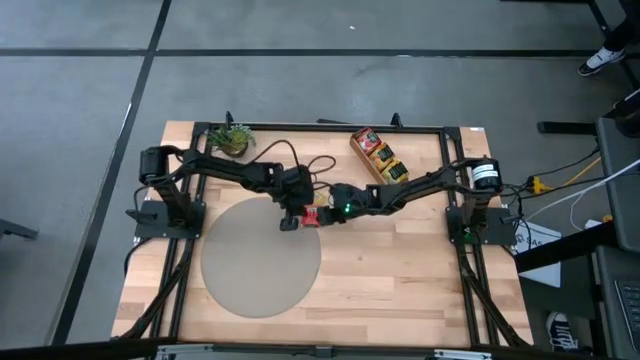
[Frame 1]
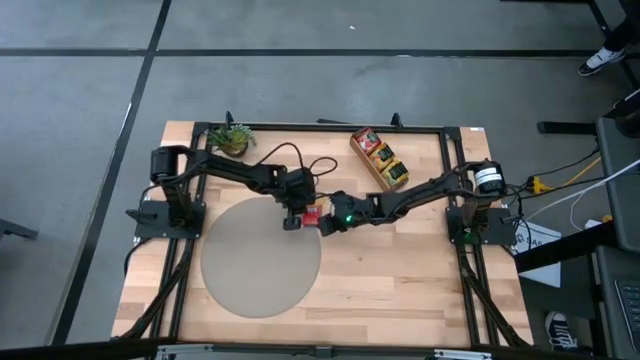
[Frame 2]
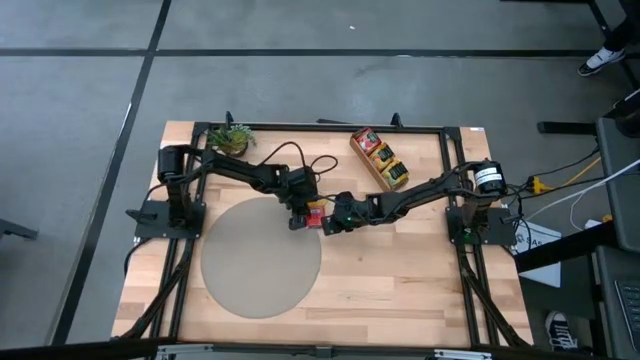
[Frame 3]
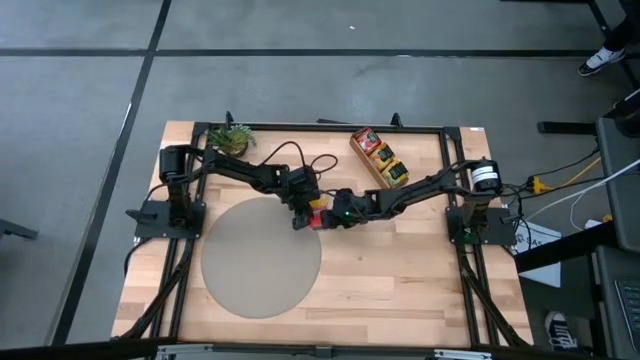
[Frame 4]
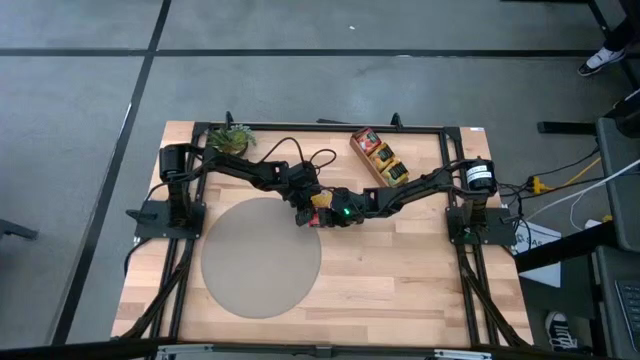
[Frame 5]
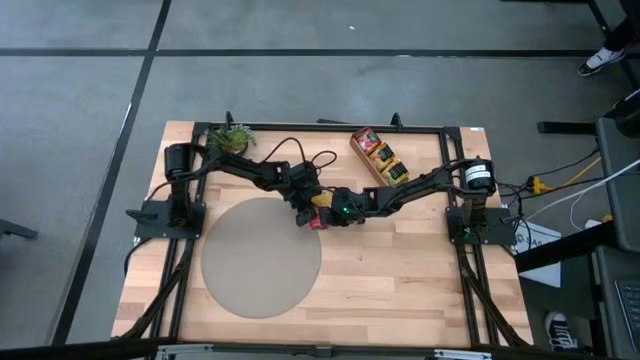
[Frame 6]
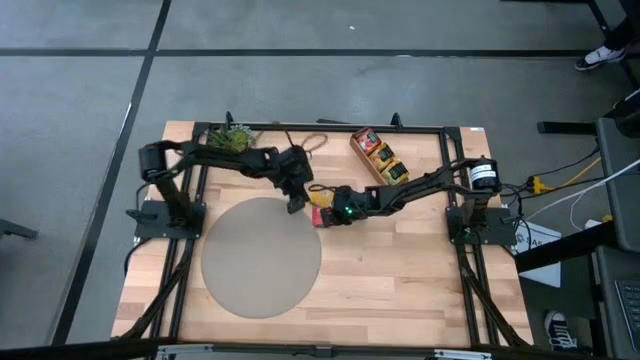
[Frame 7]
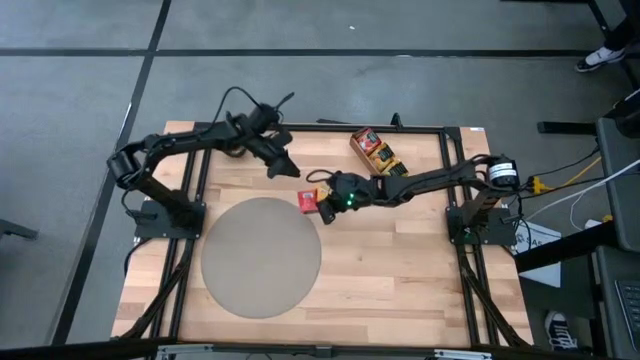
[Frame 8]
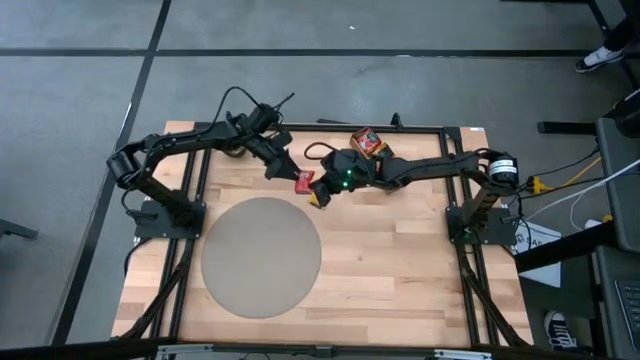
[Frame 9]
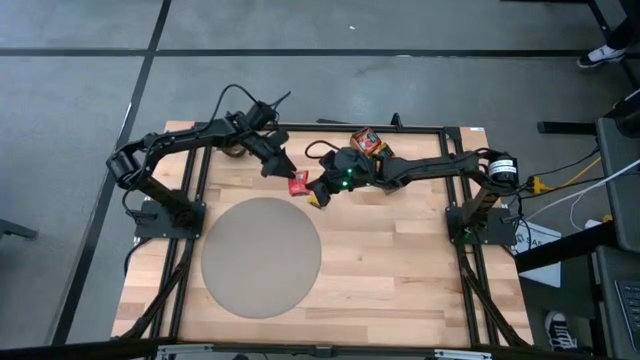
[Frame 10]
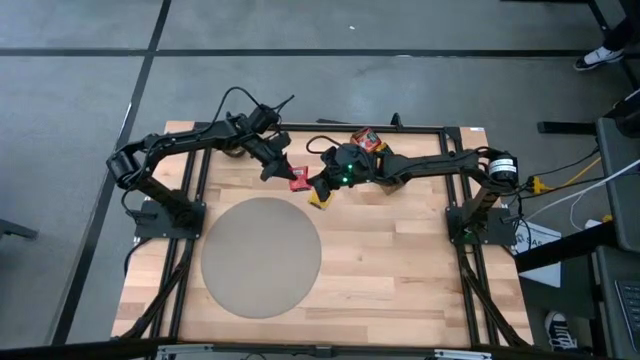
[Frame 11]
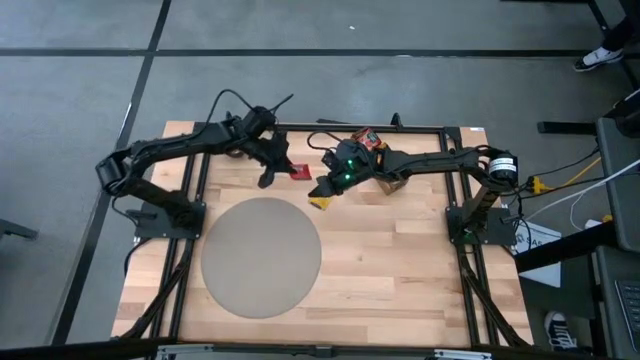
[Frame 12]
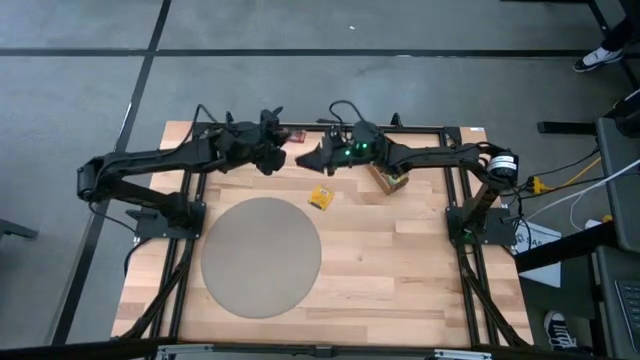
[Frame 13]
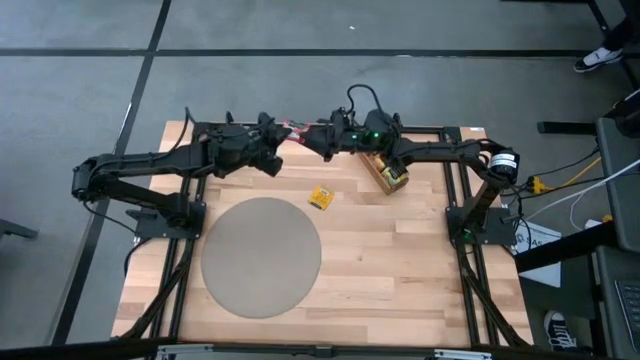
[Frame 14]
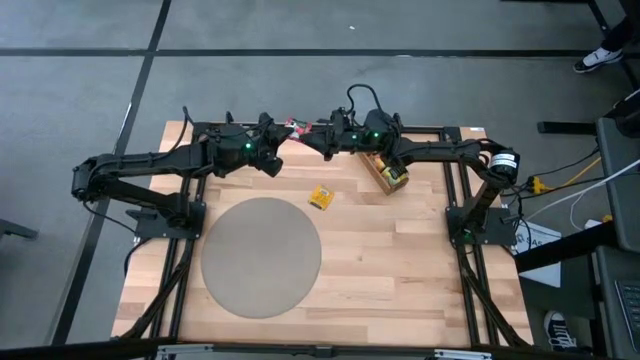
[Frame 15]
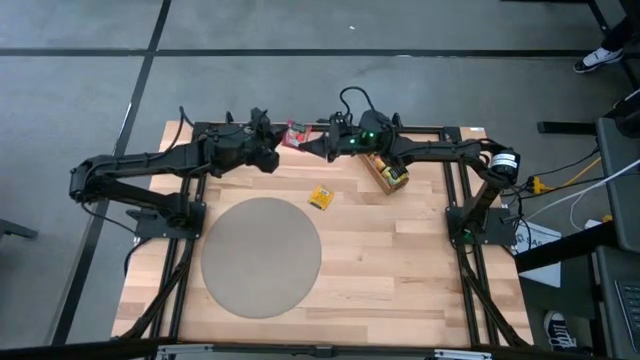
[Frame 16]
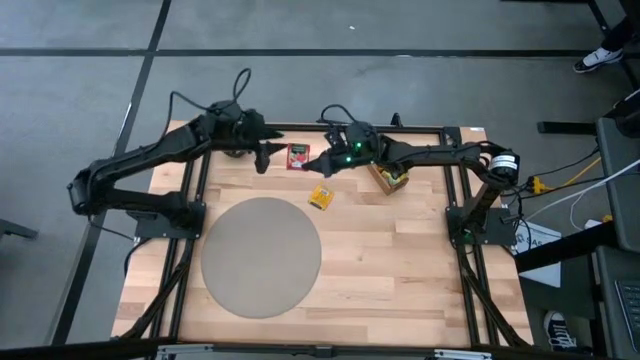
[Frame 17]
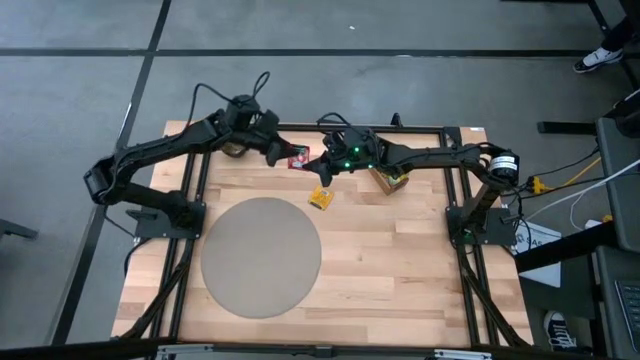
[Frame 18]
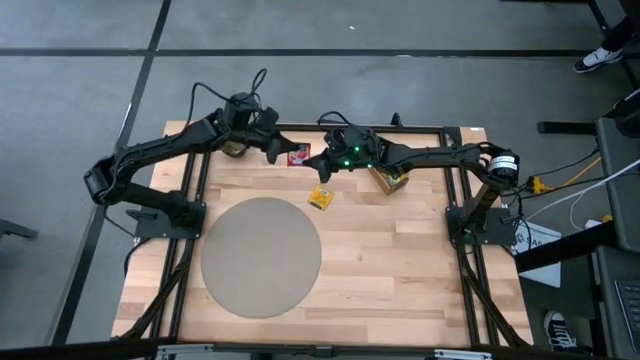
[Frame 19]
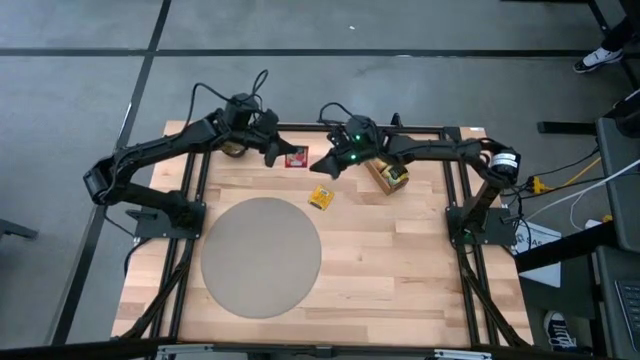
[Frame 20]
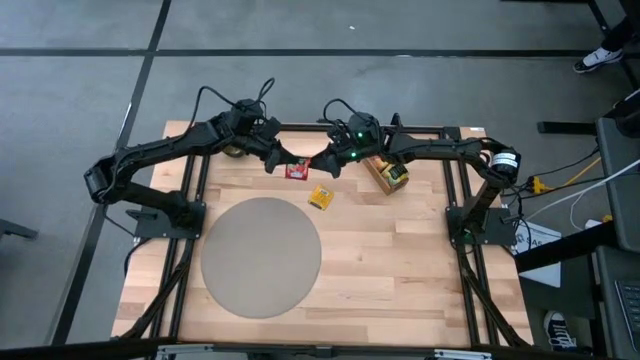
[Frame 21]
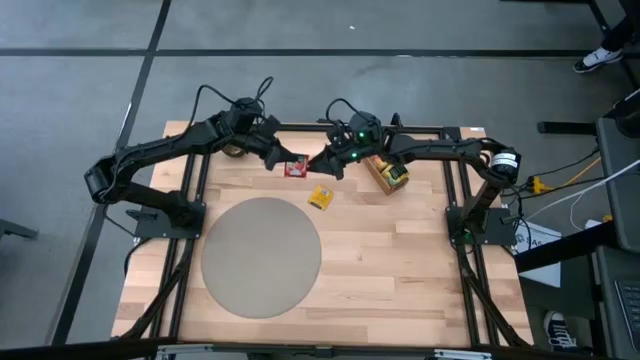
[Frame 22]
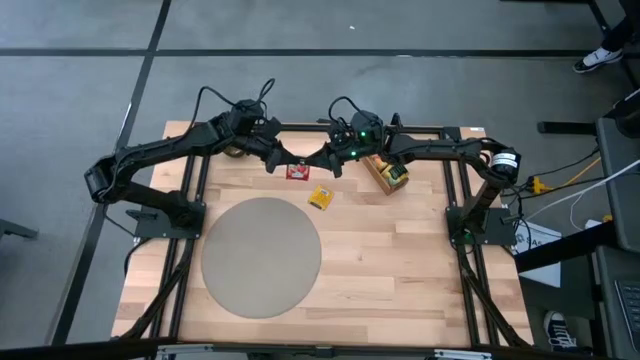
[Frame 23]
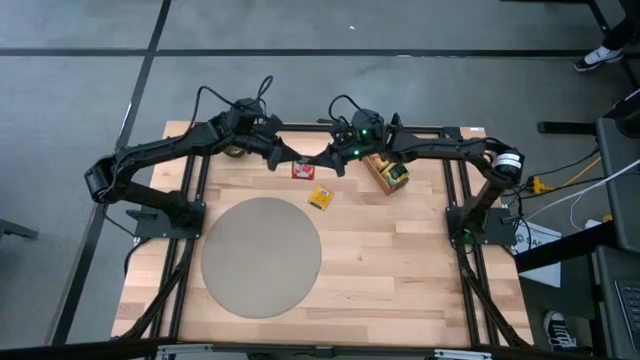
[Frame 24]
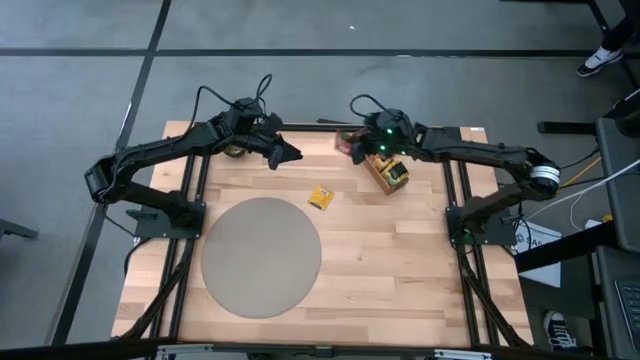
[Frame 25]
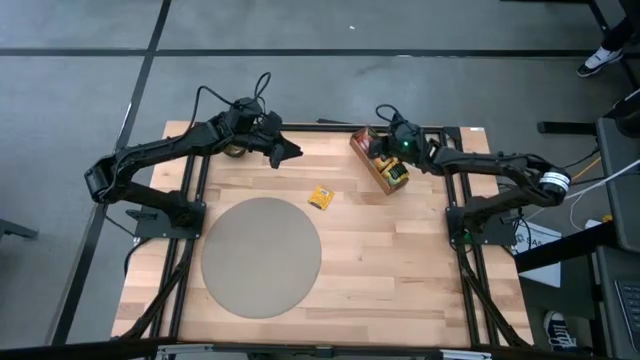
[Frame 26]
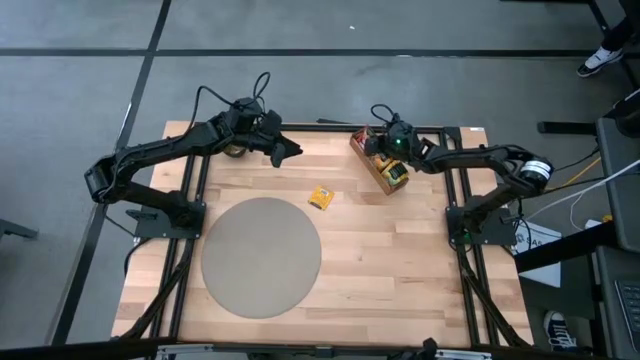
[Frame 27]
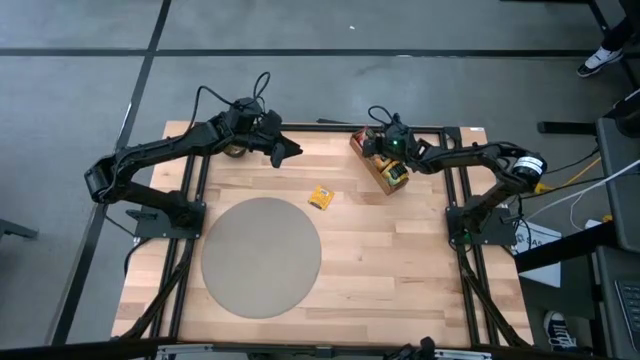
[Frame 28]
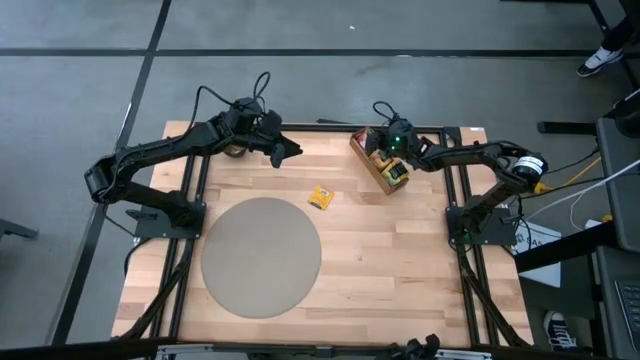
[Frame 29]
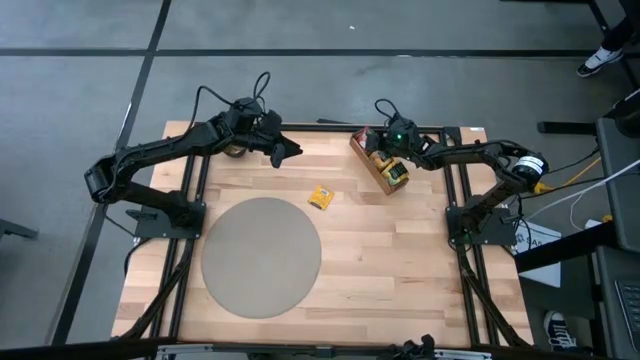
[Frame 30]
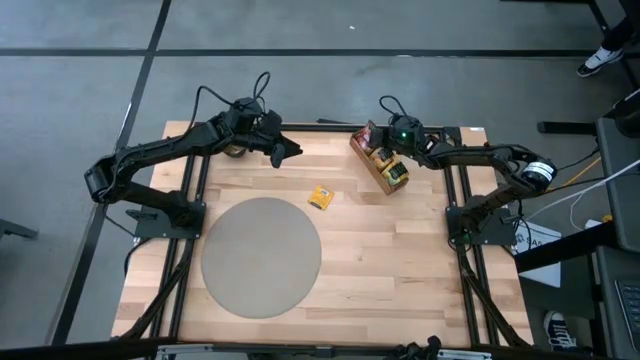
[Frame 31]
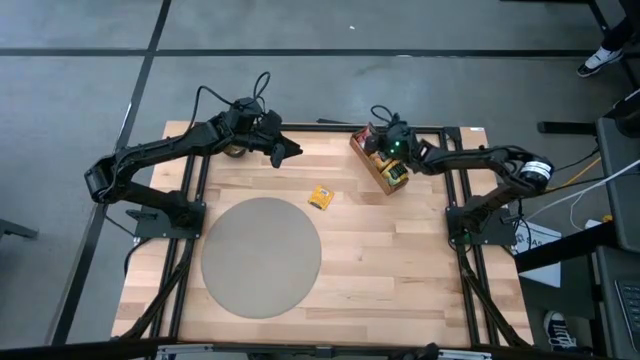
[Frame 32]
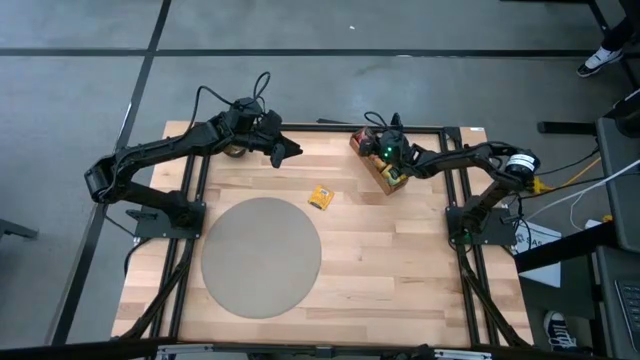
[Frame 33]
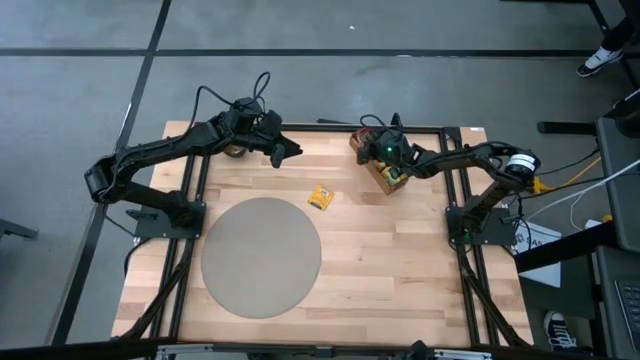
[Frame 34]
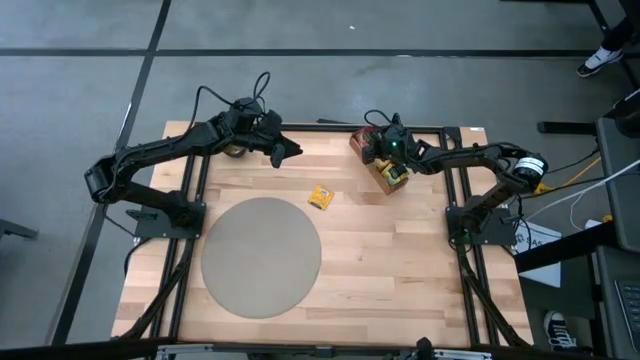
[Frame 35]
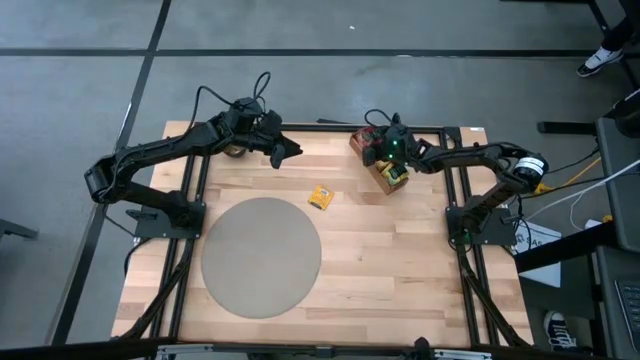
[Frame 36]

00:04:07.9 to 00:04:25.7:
Task: Pick & Place Tea
Put the red tea bag into the top section of the wooden organizer

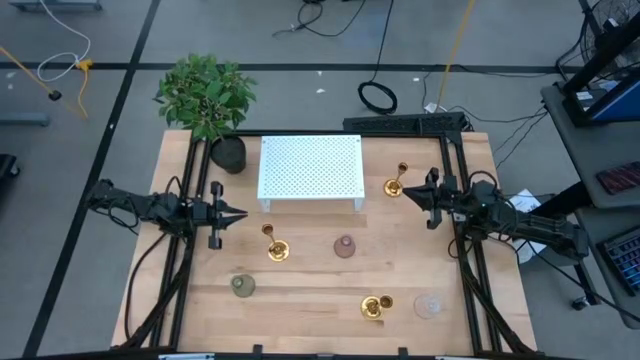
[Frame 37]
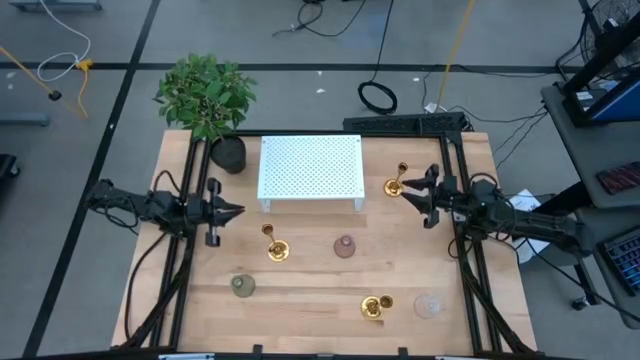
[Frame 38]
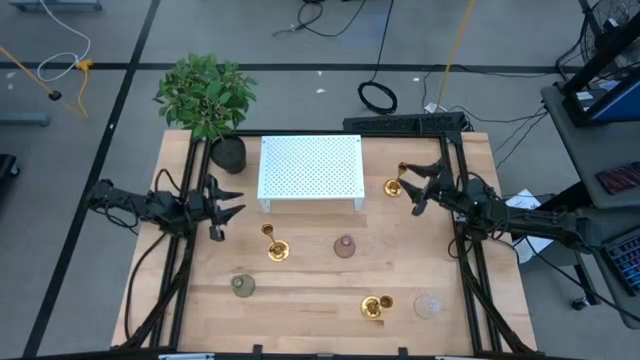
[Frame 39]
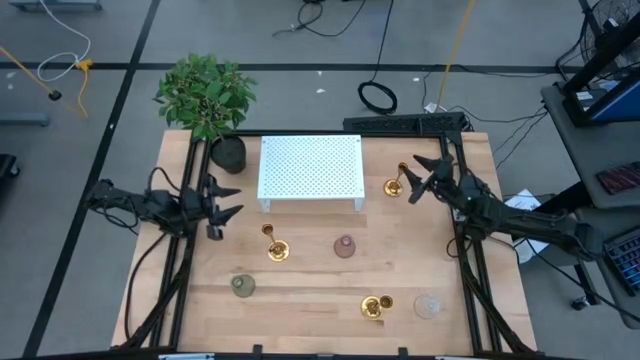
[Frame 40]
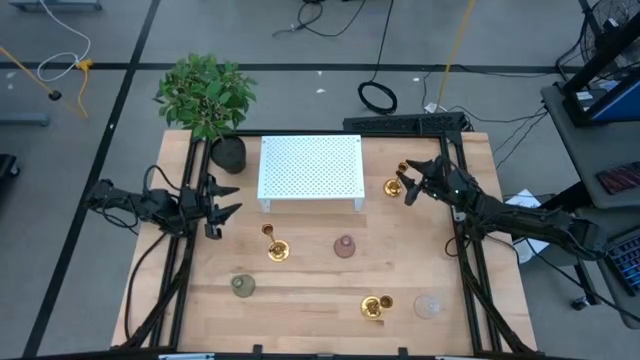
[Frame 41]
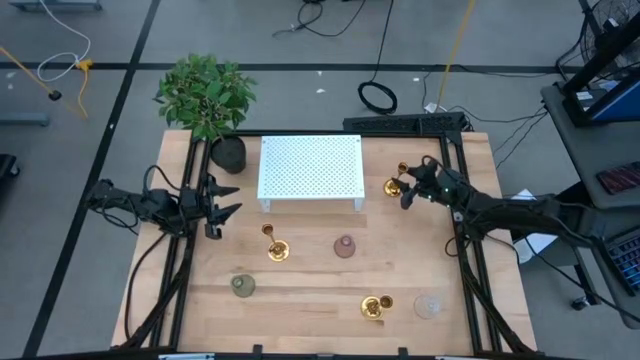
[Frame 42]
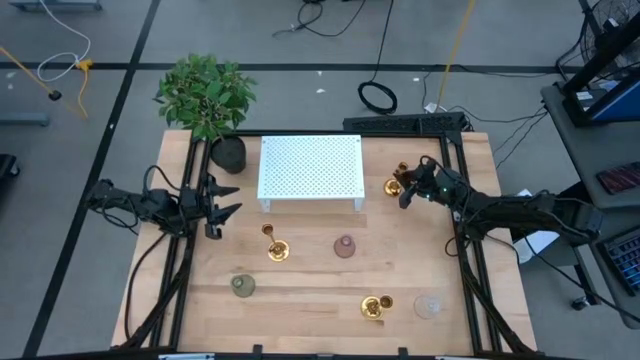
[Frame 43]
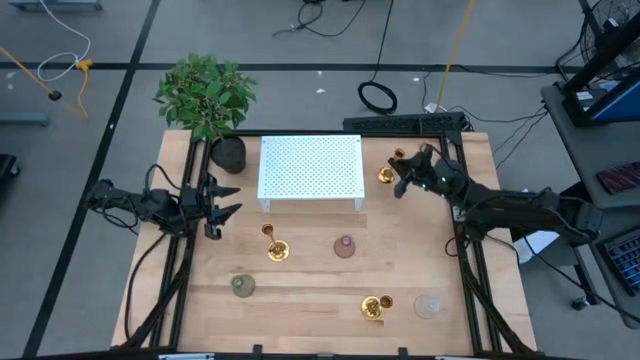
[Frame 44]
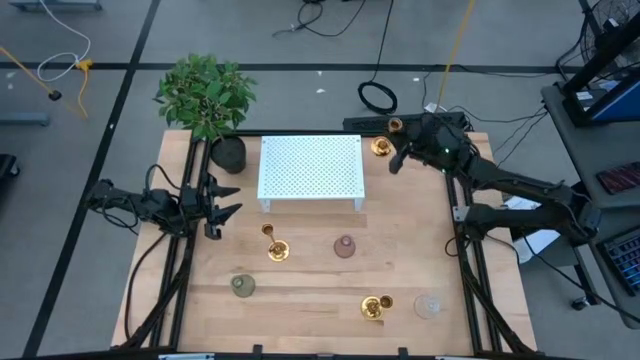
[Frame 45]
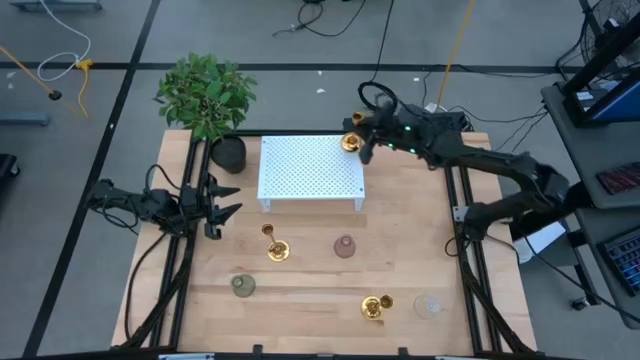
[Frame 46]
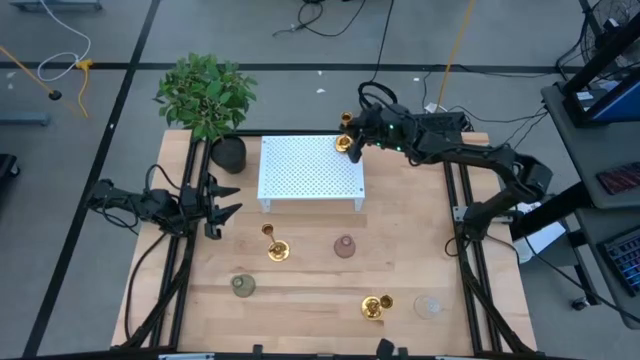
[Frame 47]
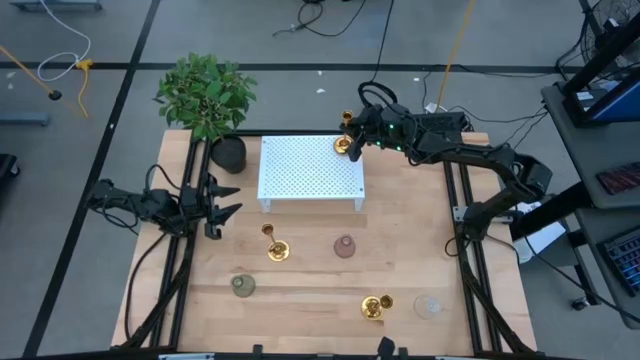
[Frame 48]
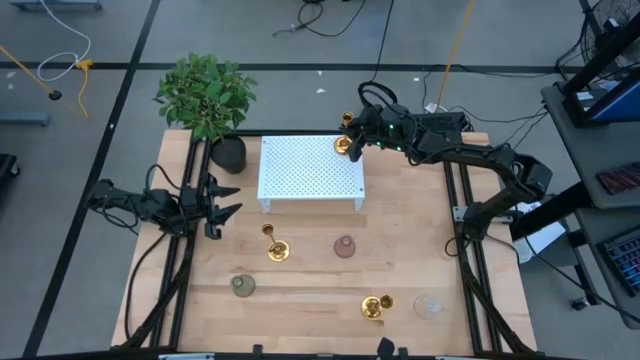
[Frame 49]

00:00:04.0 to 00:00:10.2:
Task: Pick & Place candle stick holders
Put the top gold candle holder on the shelf
